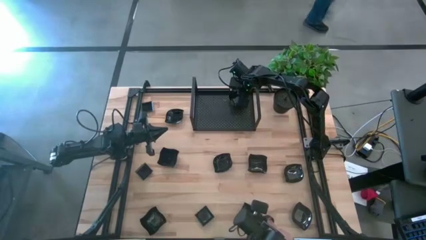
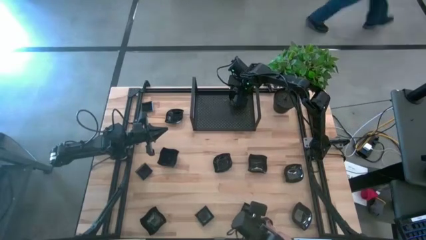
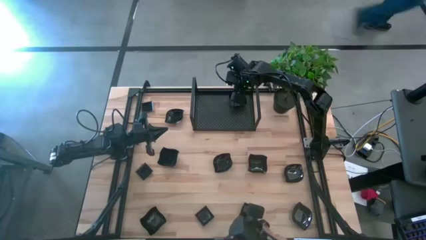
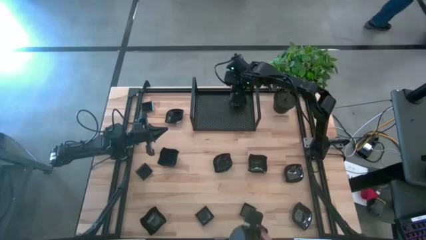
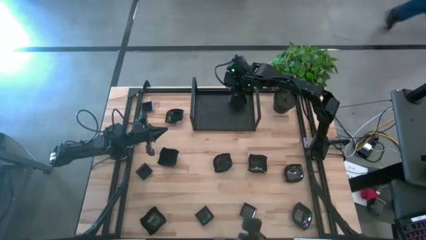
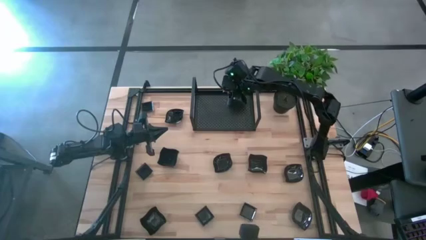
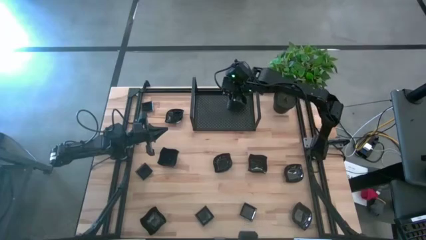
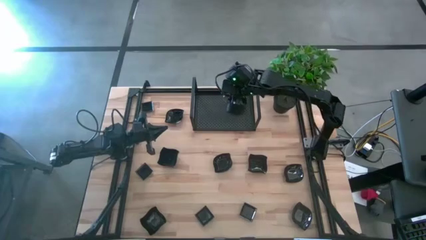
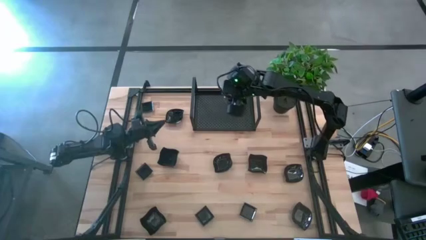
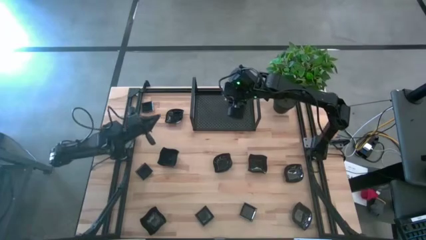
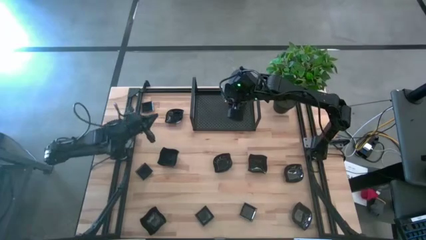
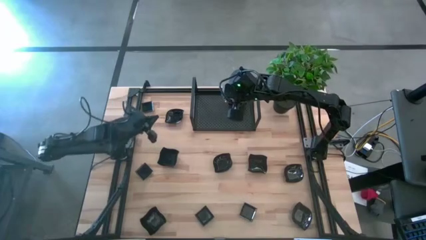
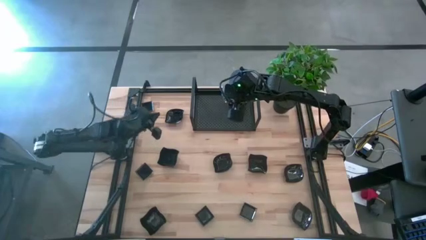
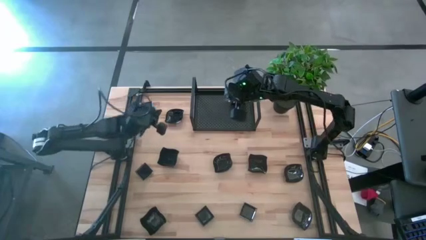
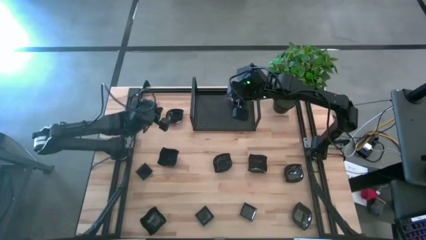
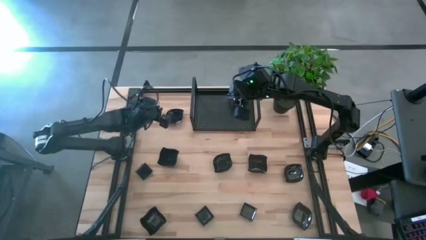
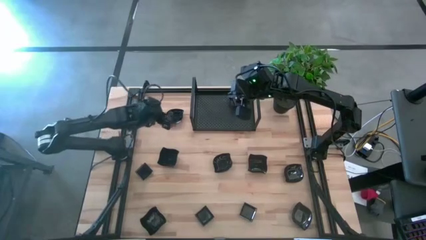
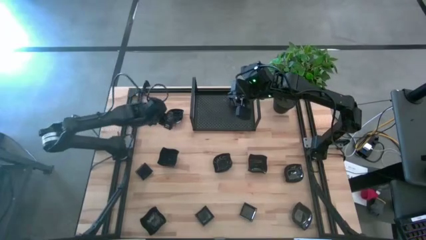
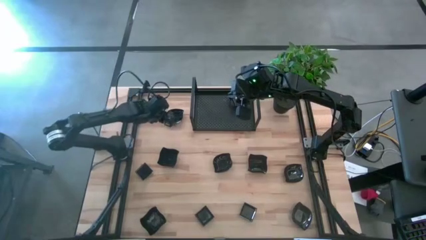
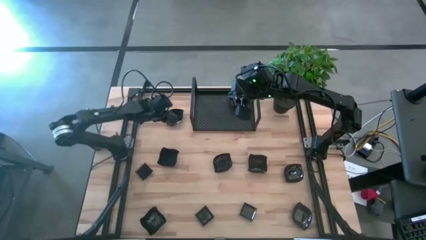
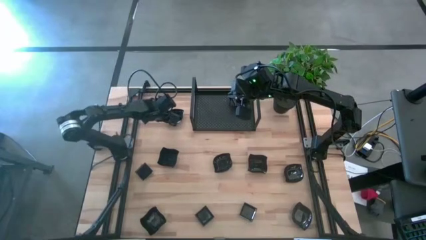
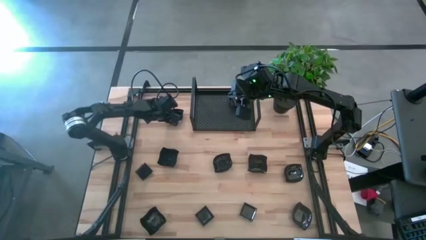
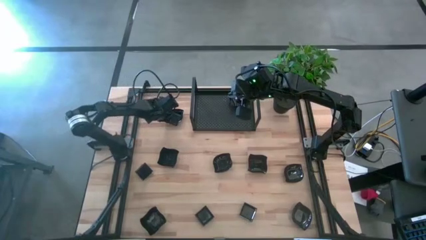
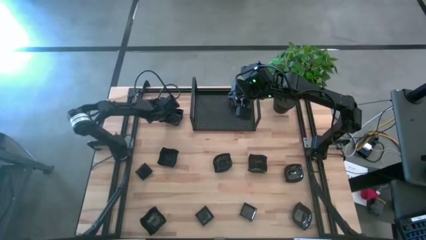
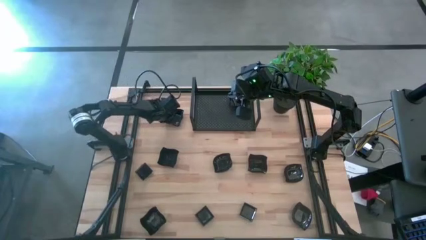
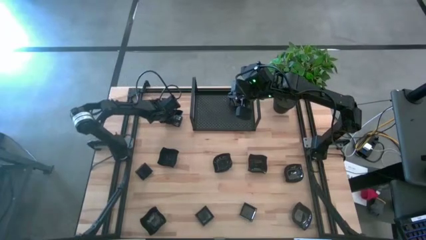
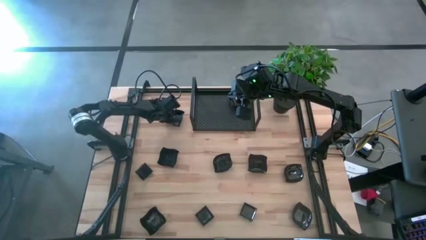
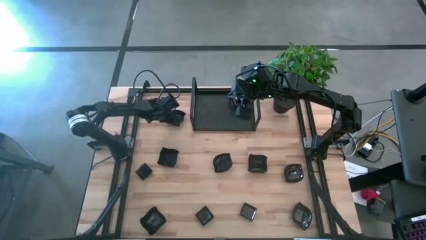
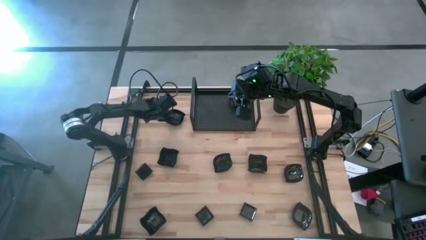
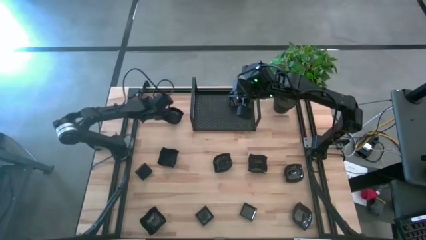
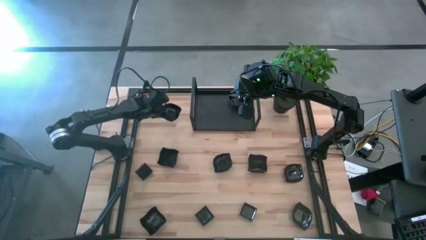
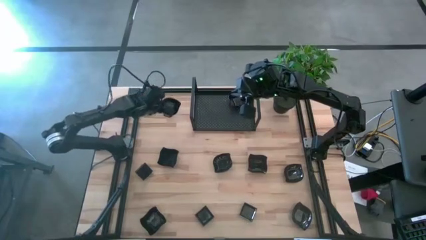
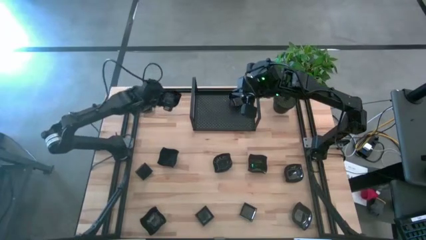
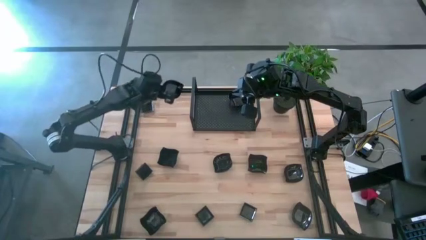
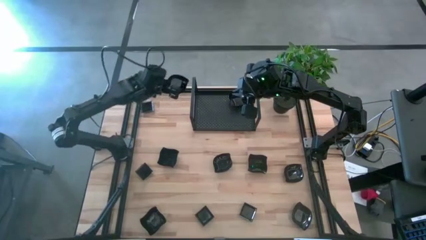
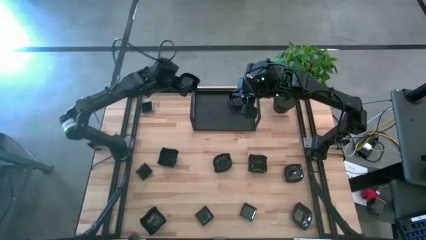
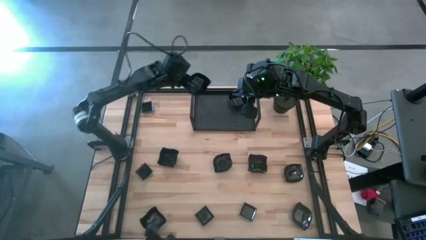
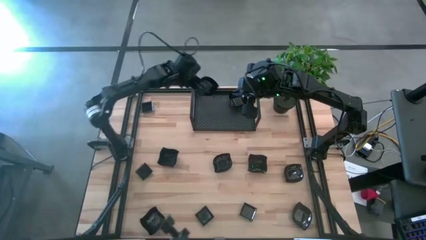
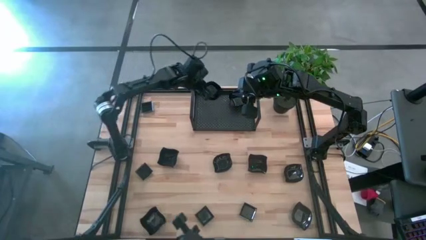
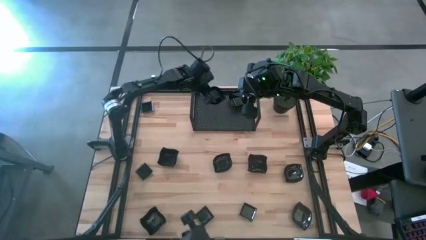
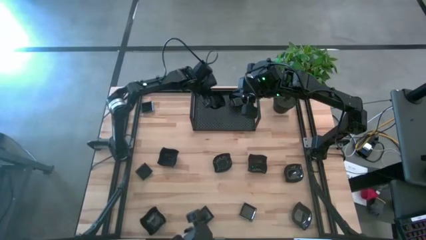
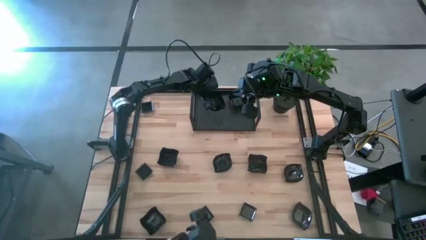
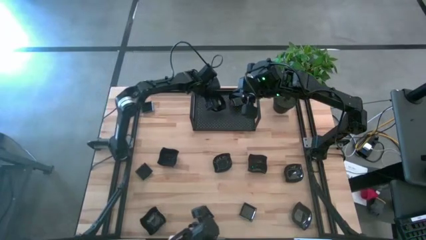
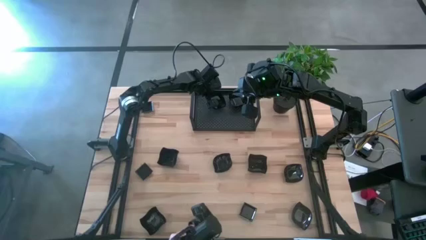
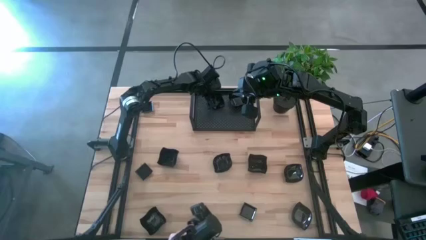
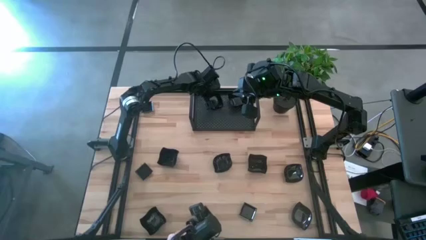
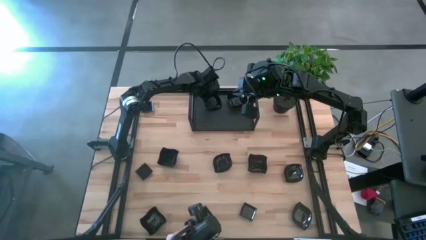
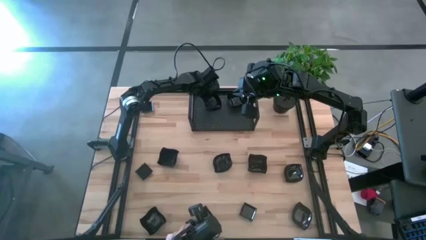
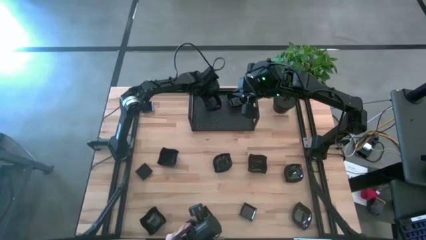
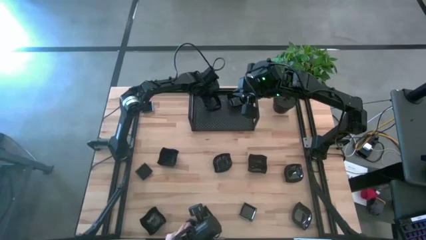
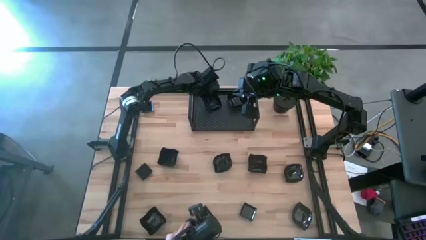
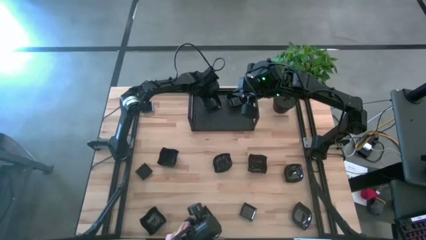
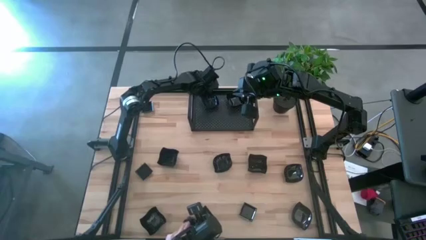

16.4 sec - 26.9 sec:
Task: Pick & Place Mini shaped plates
Put the black leaf-shaped plate on the shelf

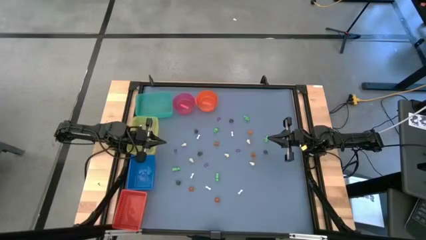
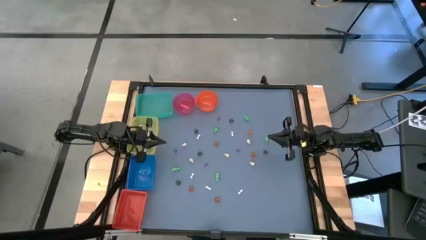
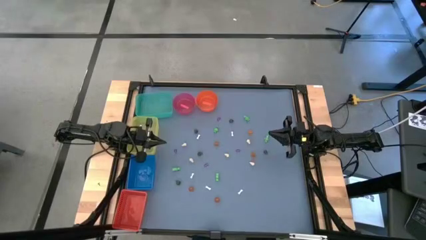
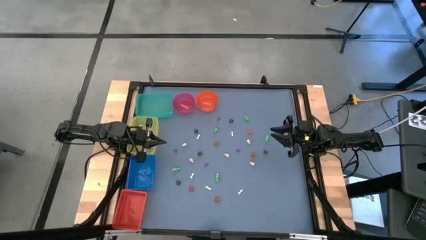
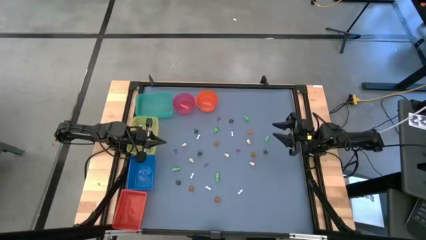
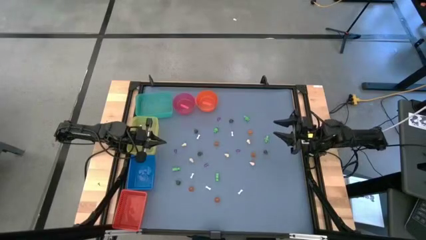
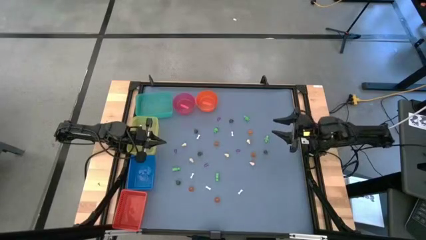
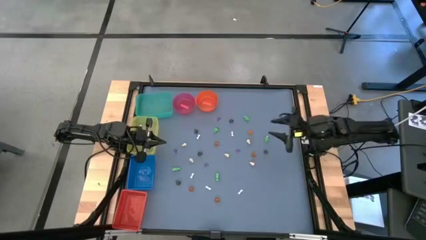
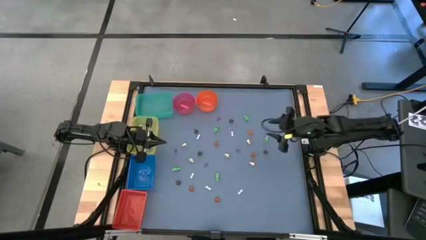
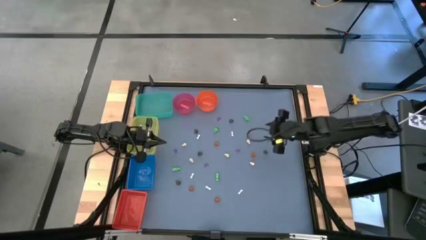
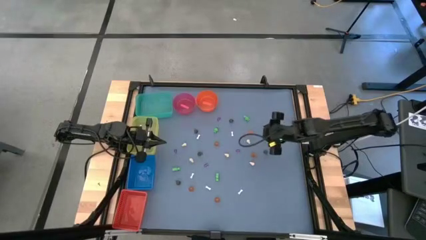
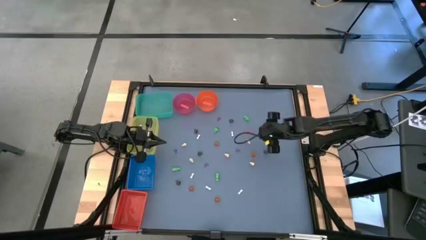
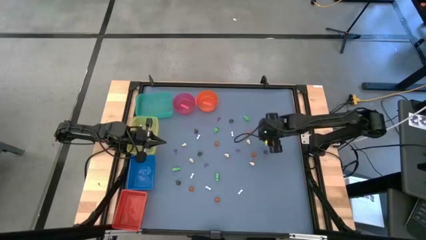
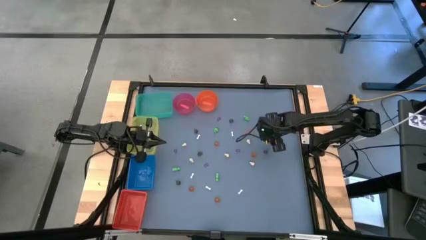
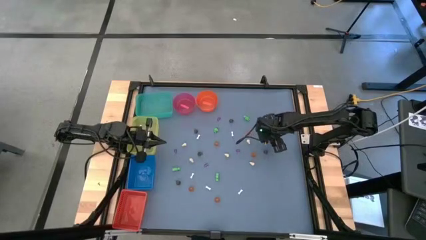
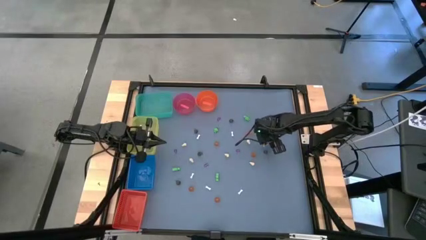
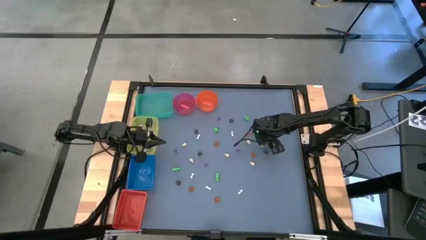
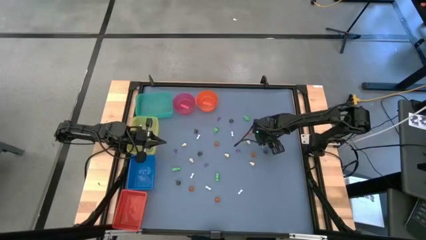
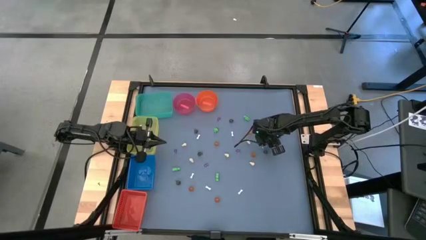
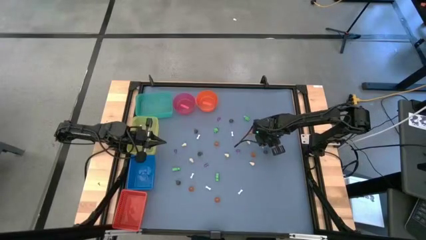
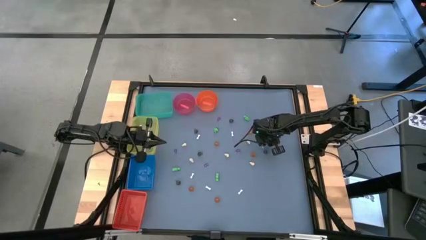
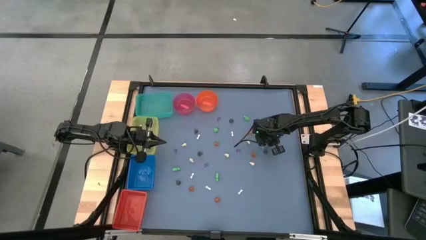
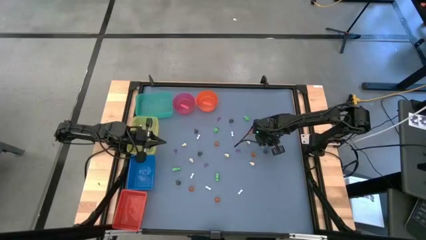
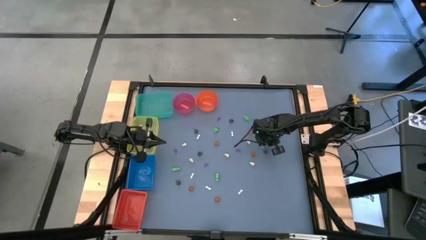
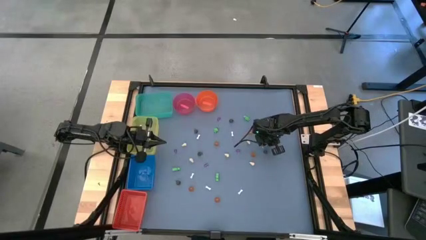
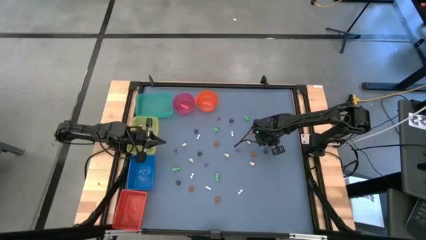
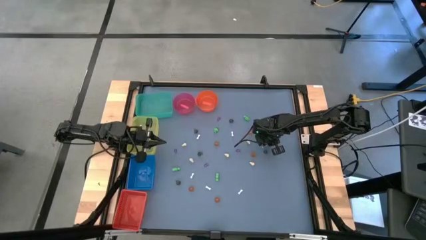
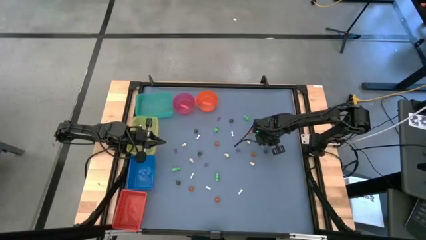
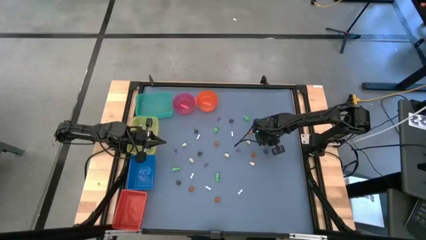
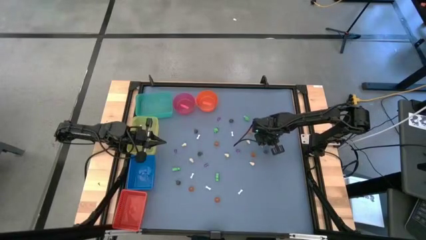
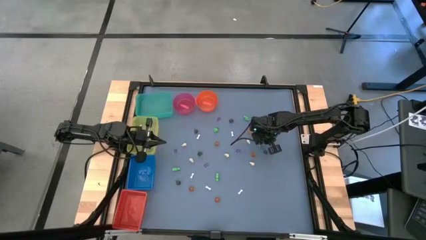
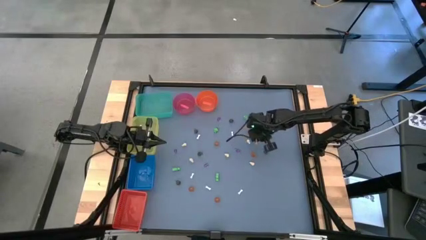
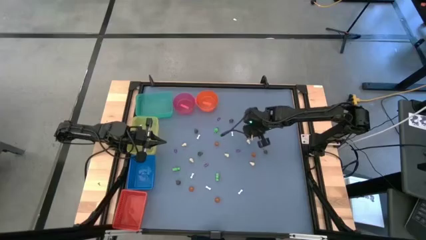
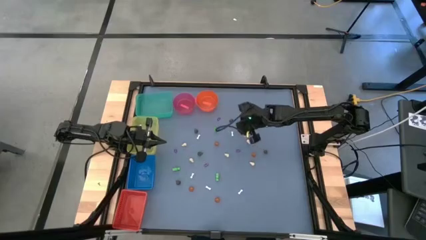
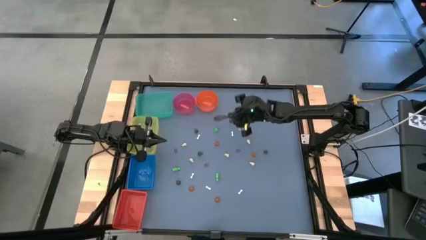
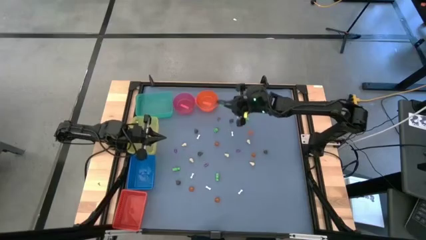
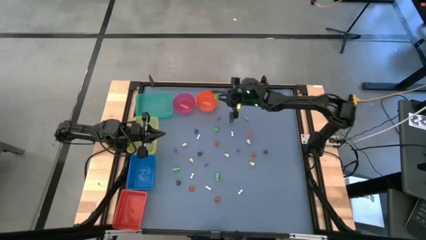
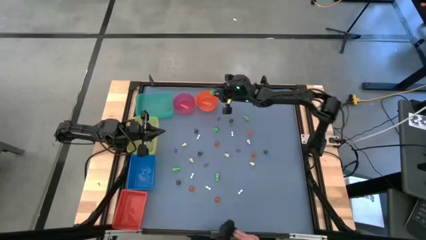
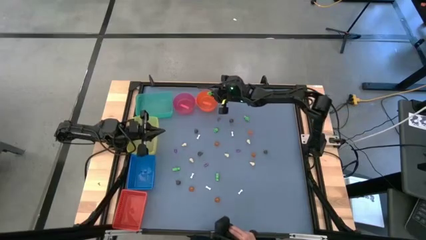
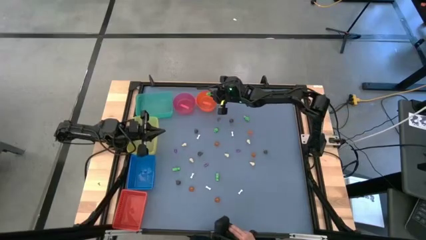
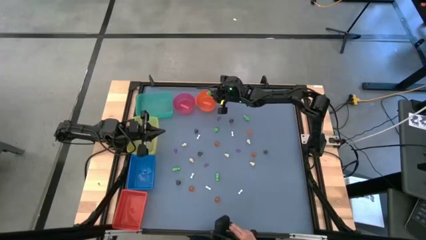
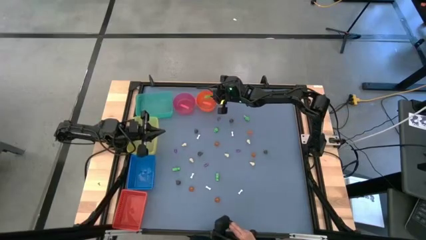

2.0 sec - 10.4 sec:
Task: Sort Halloween decoration
Put the green skeleton toy into the orange bin
